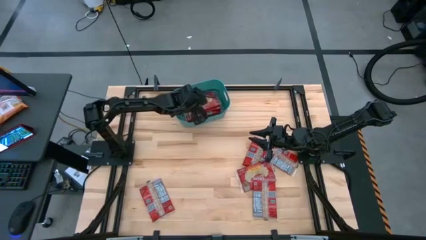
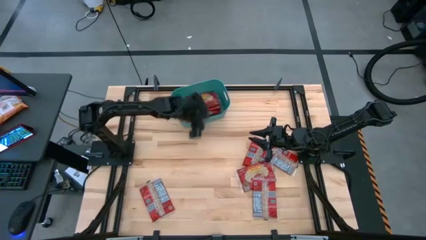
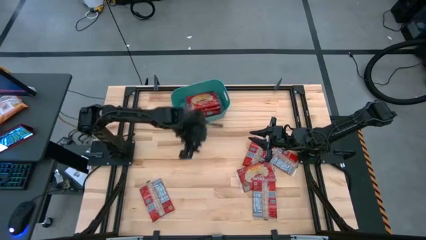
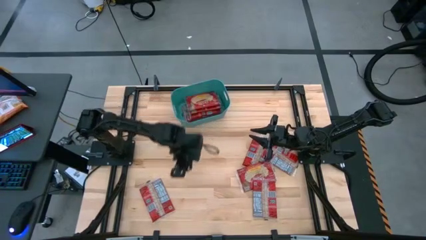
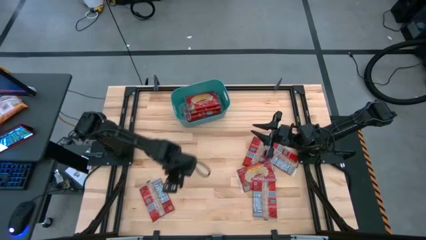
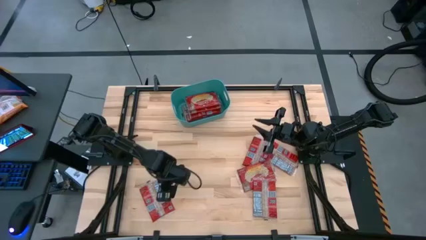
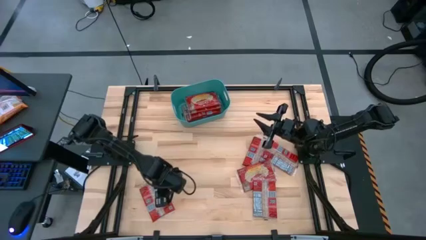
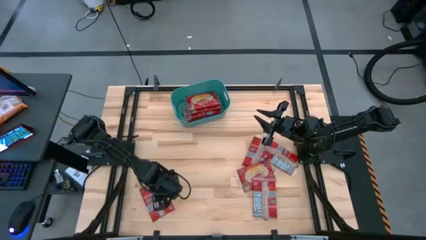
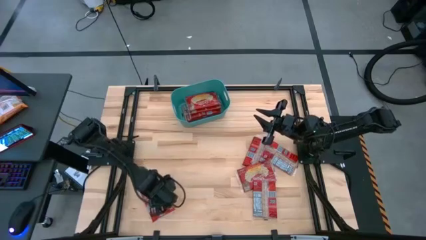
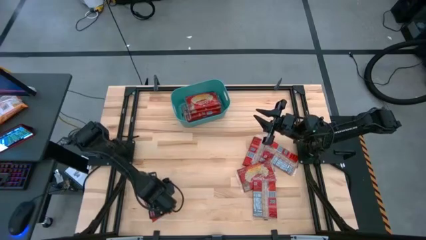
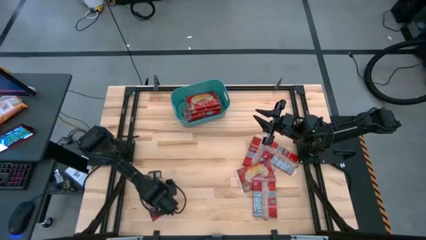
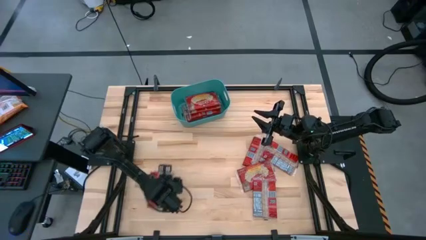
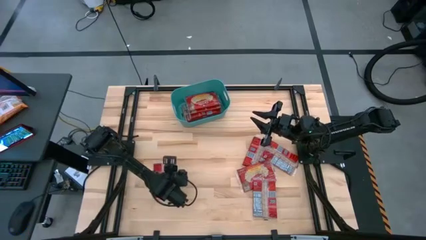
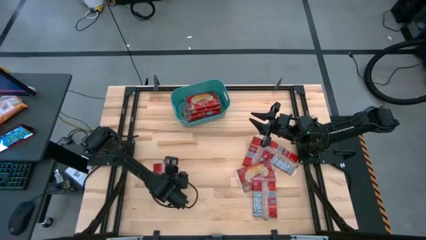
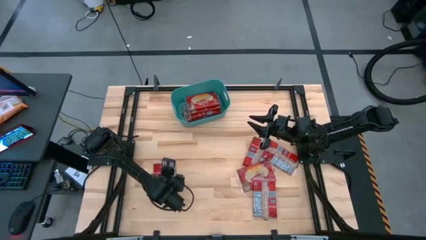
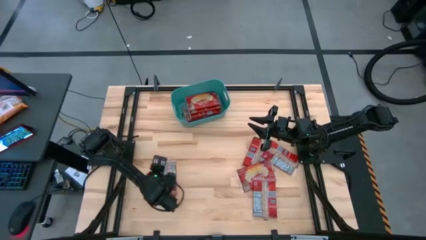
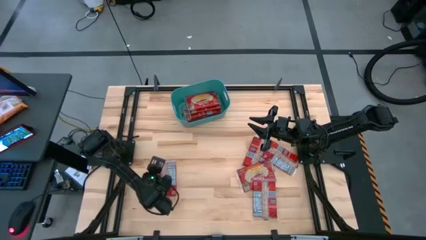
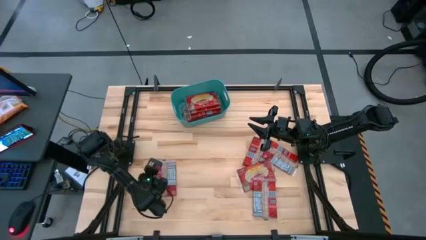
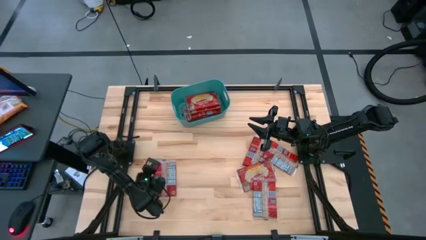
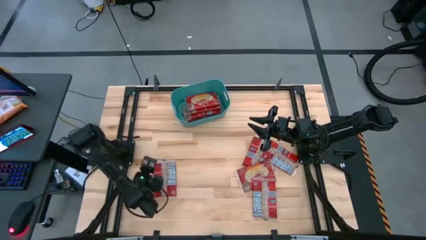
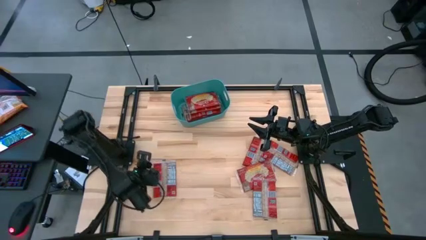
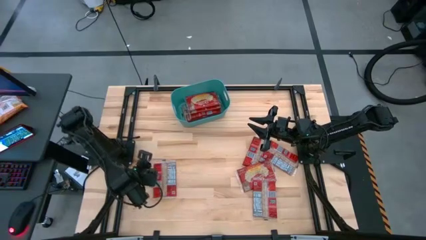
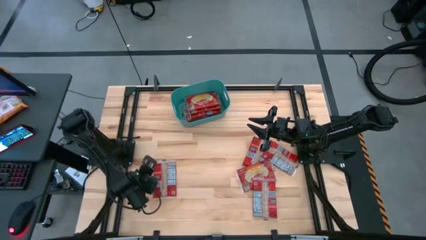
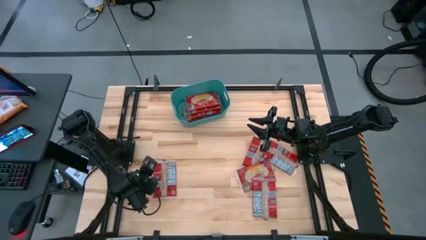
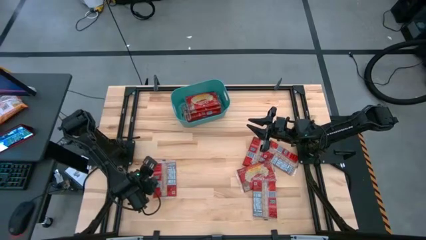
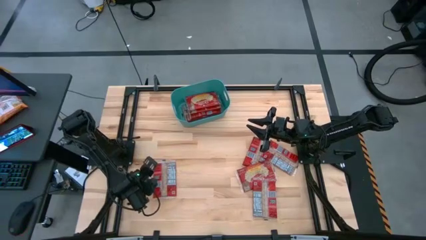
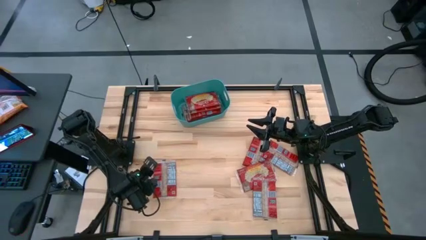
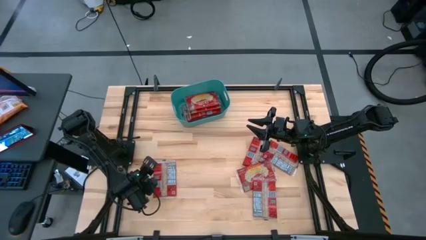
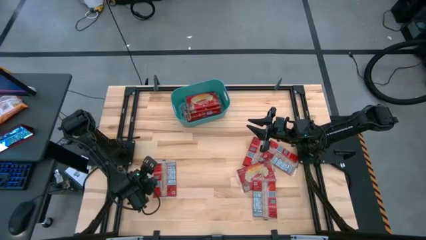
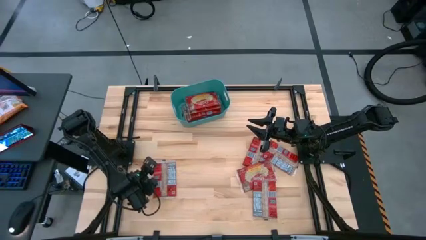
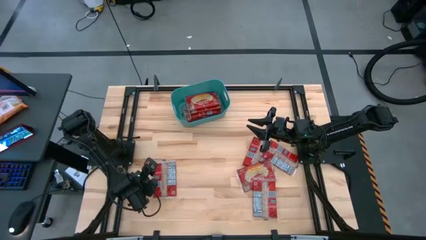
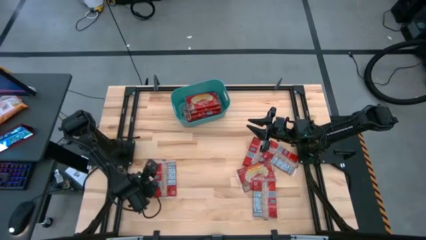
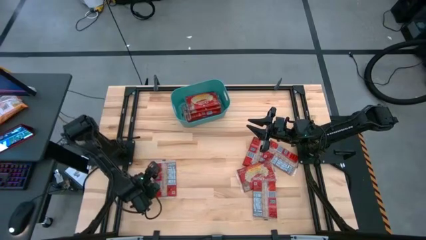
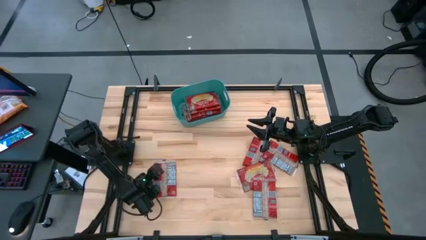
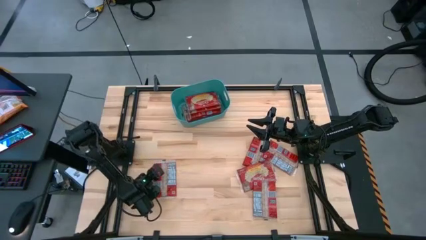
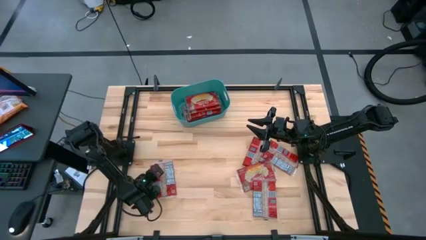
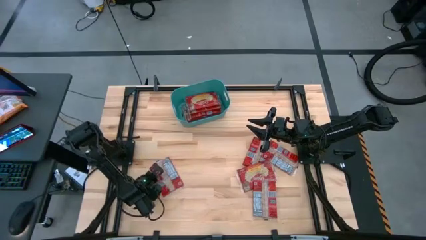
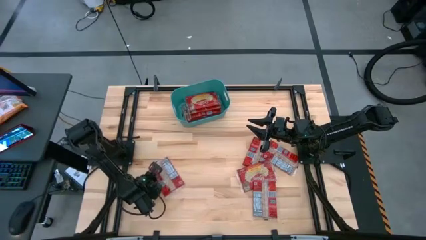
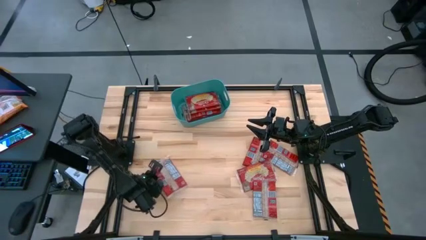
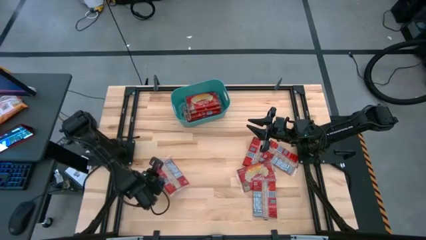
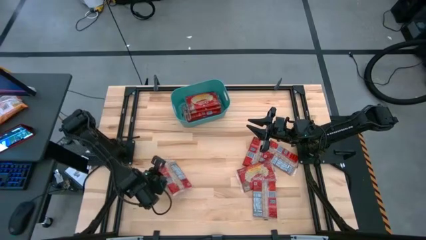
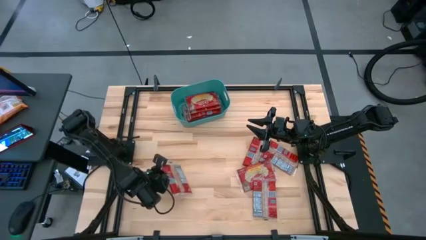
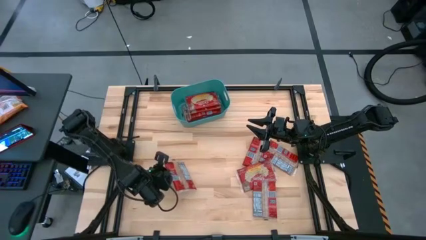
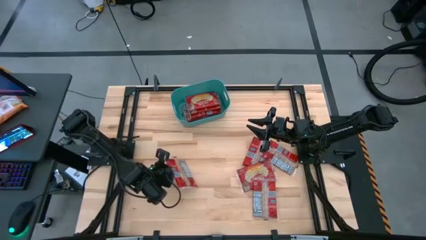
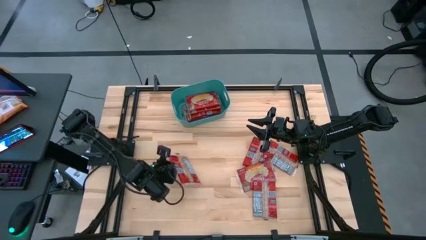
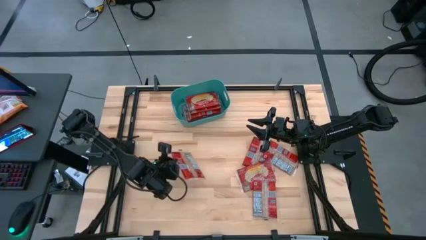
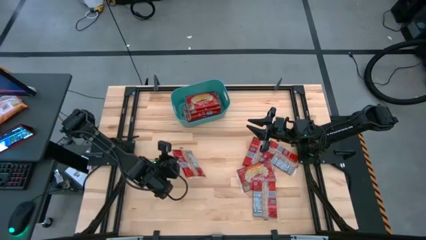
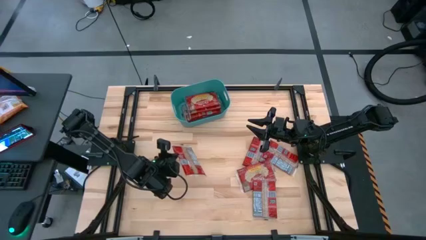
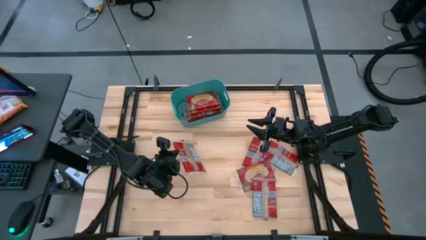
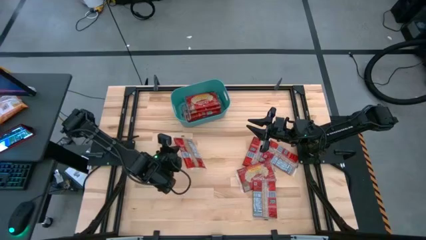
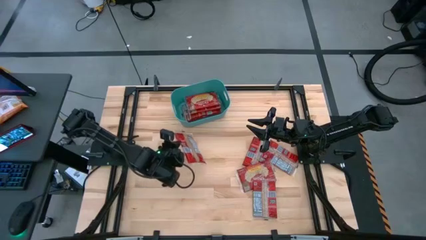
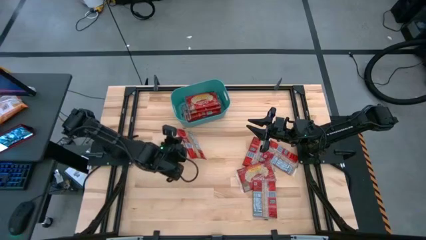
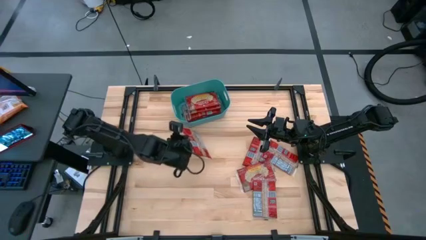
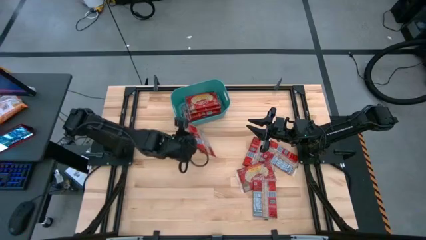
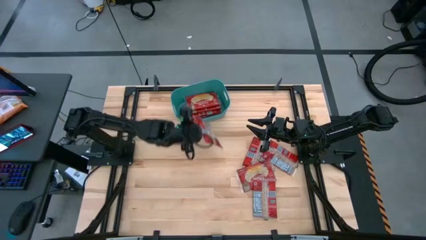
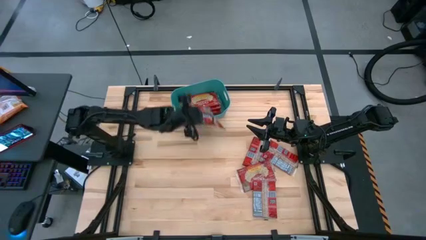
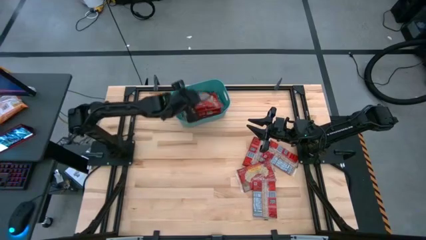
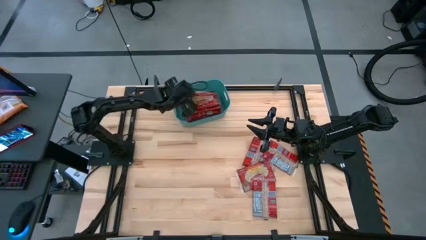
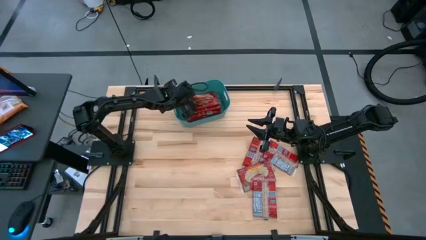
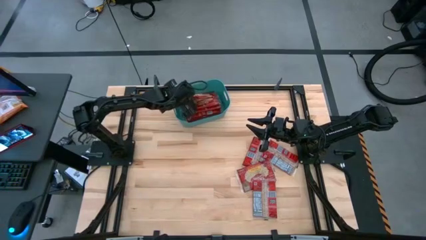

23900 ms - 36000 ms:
Task: Sort popcorn bags into baskets
Put the red popcorn bag into the green bin

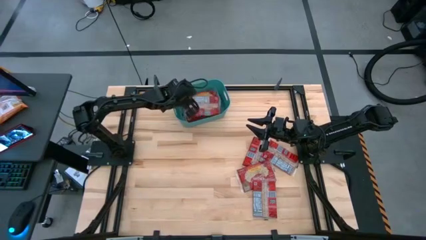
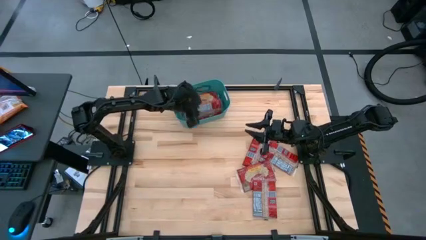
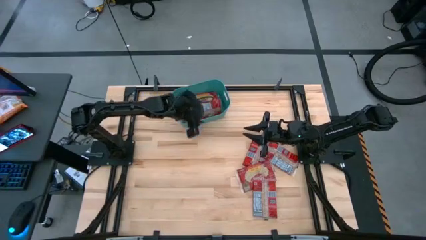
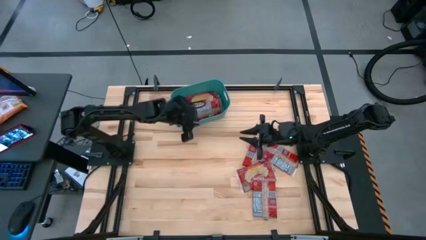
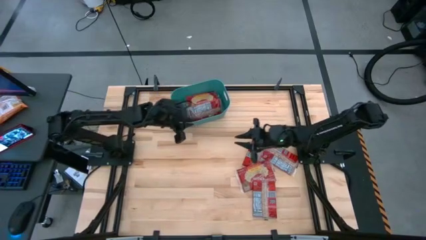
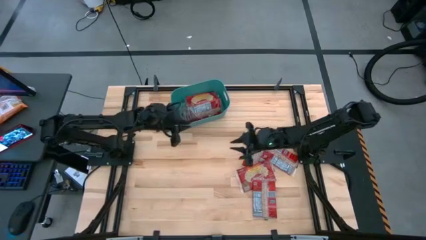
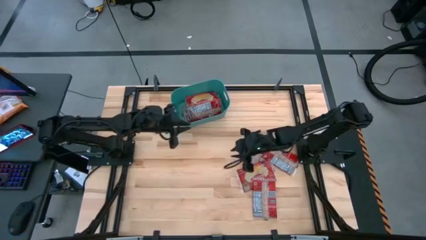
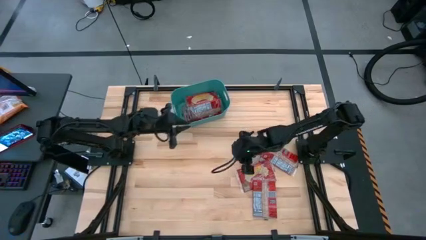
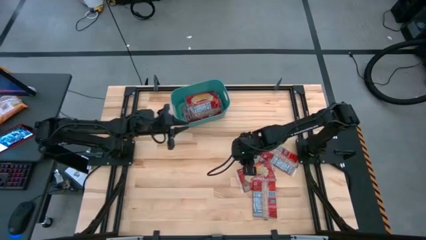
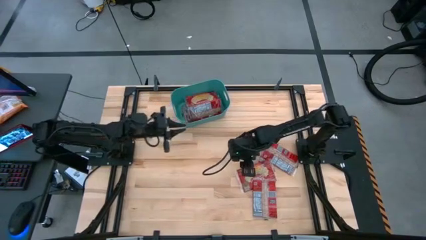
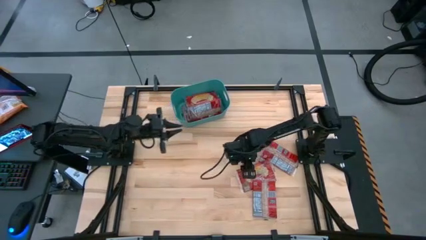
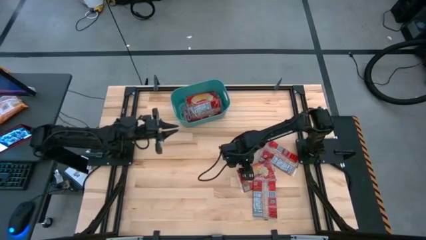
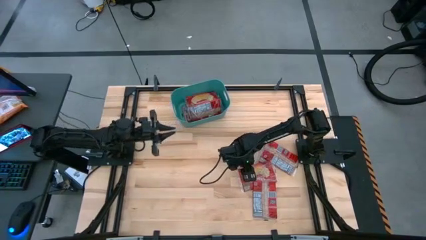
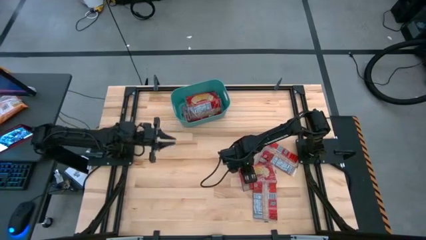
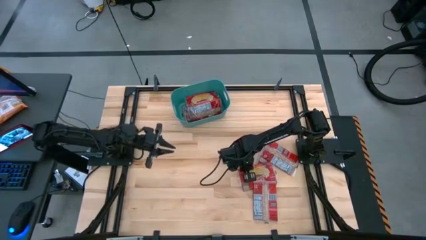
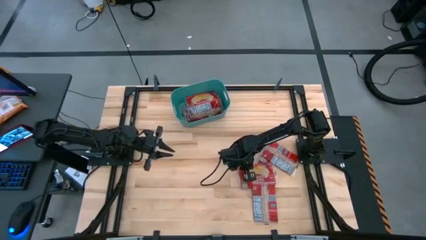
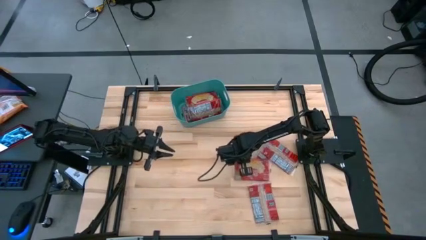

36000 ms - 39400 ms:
Put the red popcorn bag into the green bin

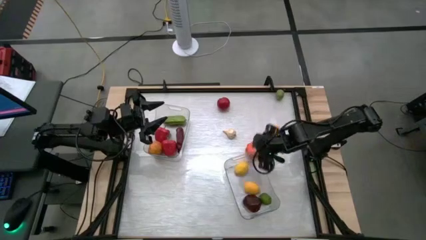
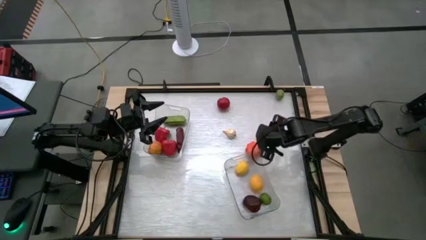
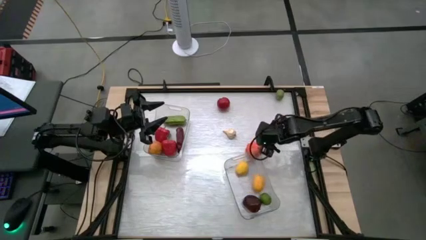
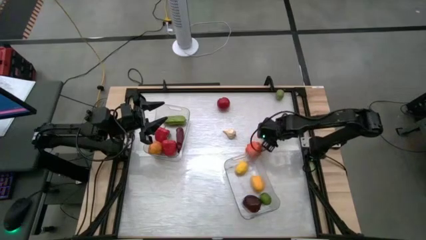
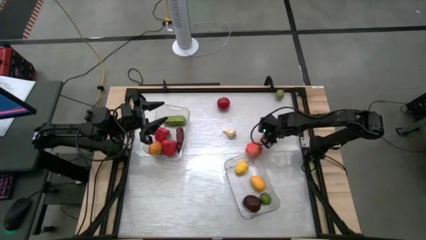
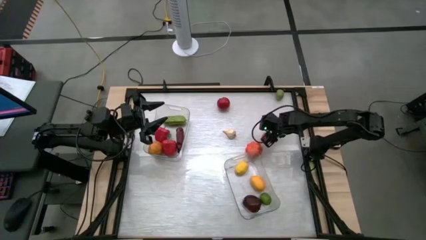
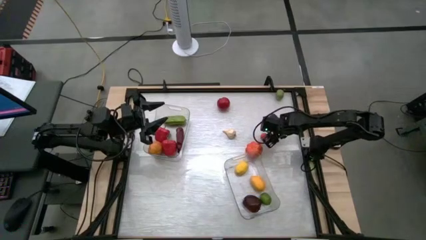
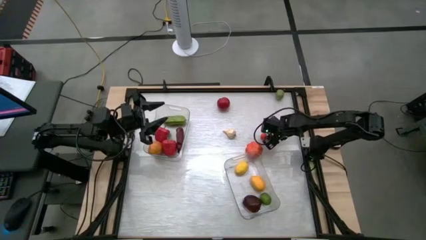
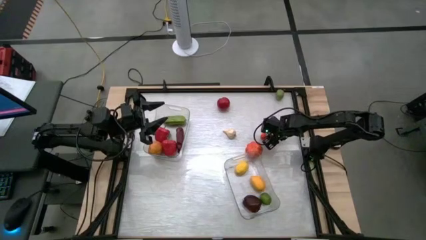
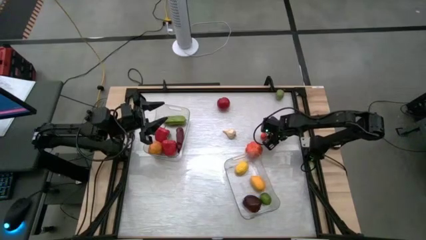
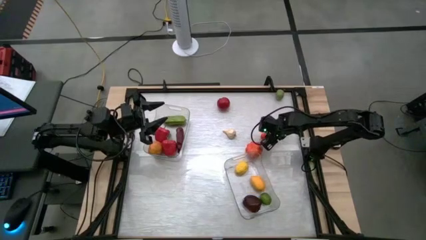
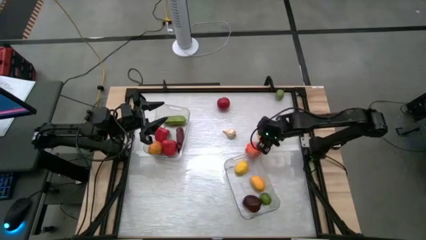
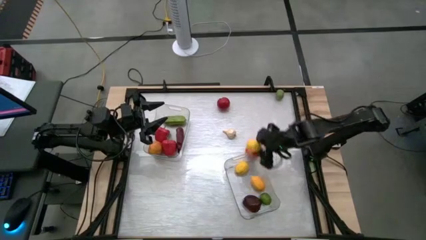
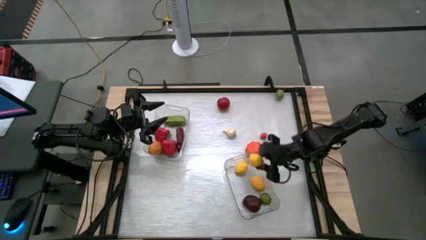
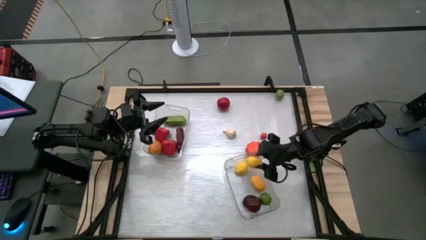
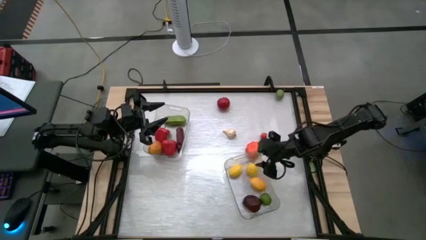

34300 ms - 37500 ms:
Task: Sort produce into baskets
Put the yellow lemon into the right transparent bin
